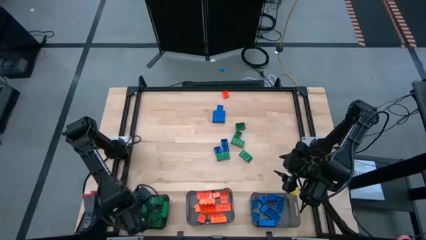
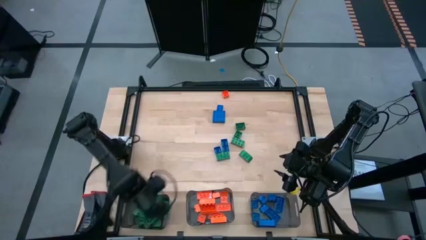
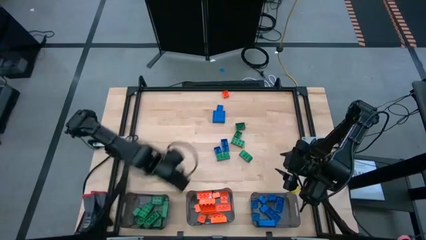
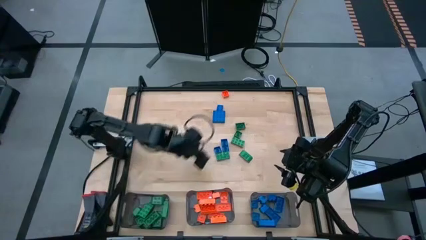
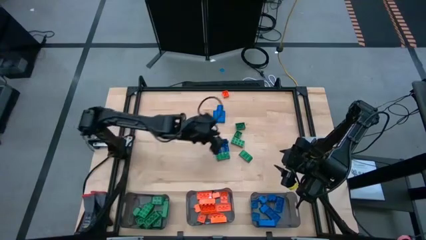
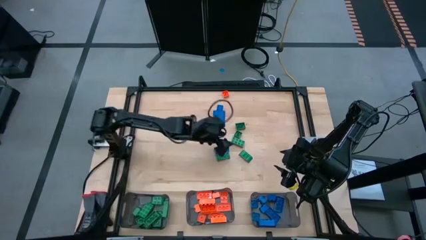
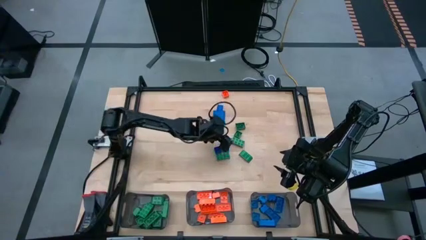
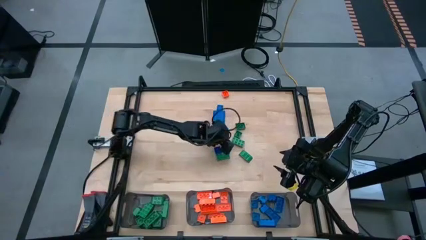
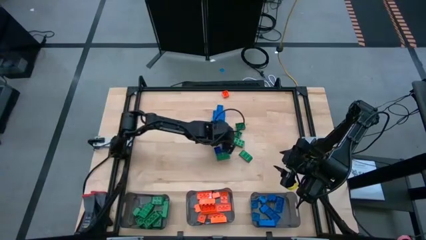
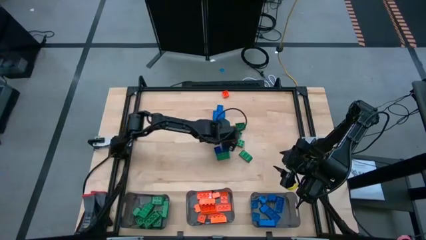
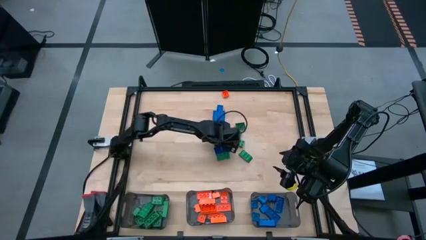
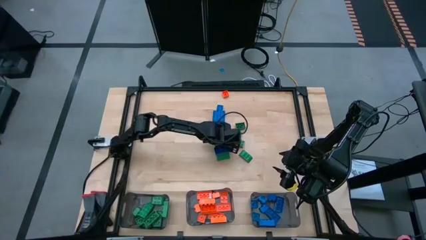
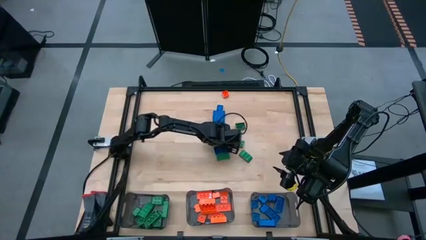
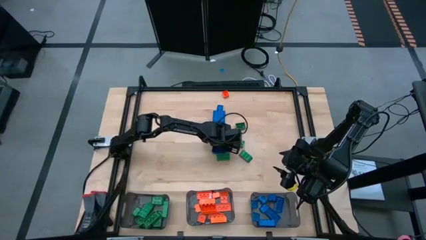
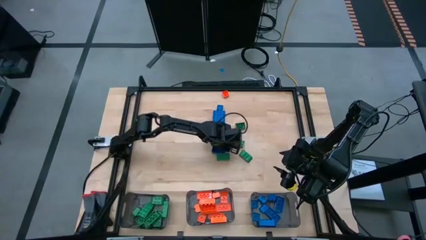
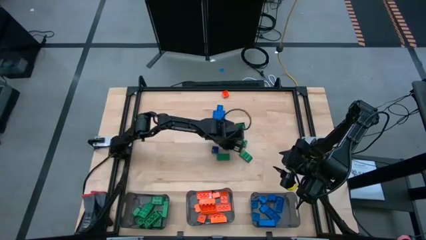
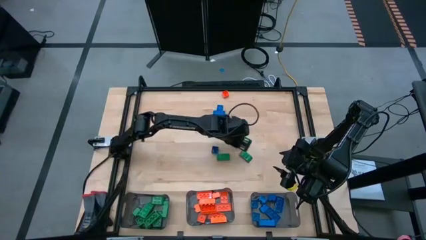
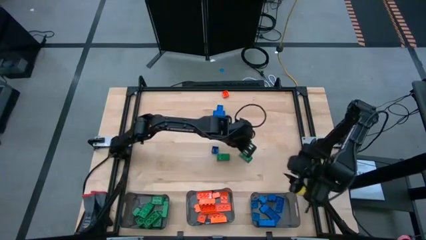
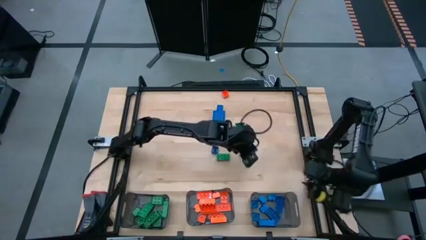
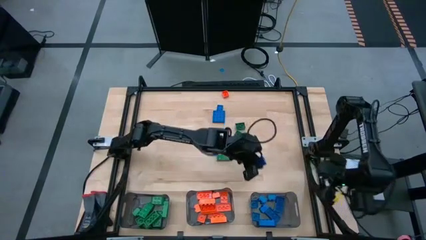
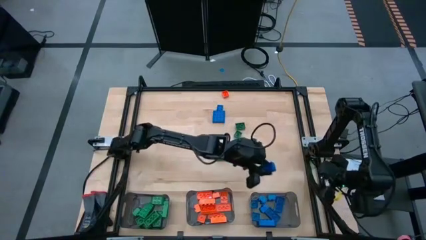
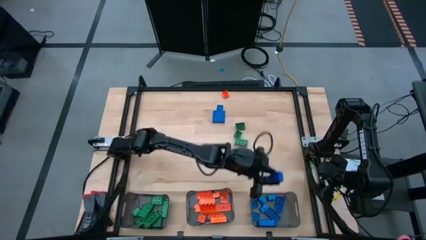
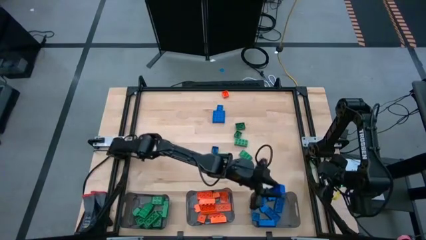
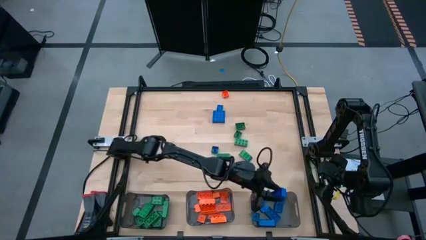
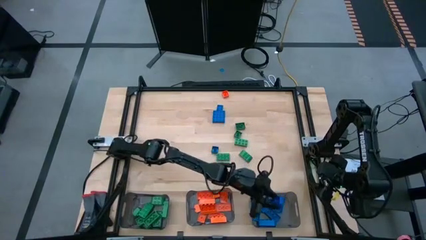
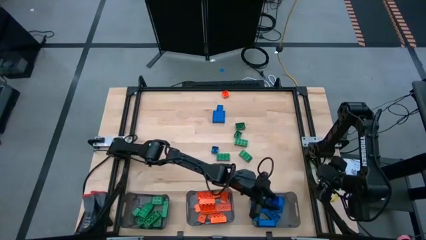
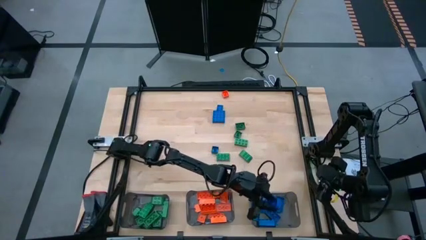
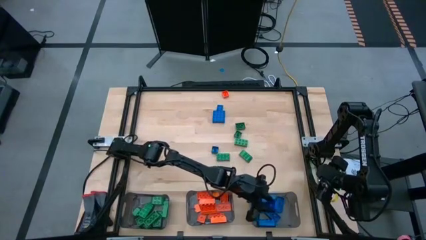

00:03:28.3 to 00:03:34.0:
Task: Sort blocks
Put the blue game piece into the right black bin

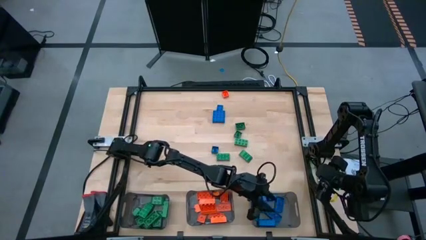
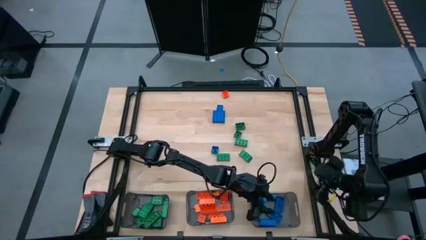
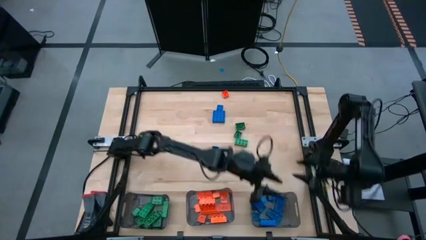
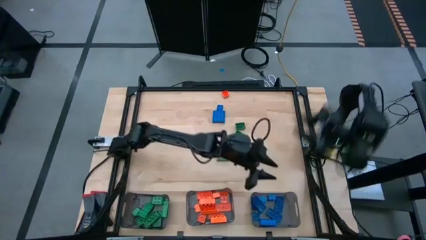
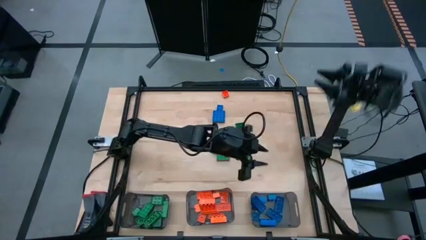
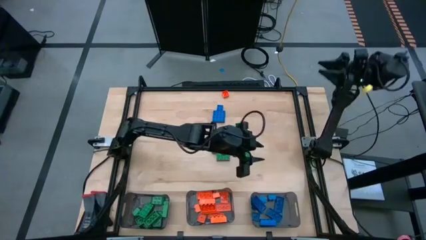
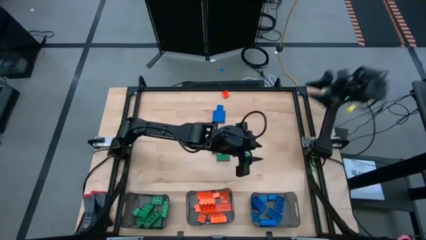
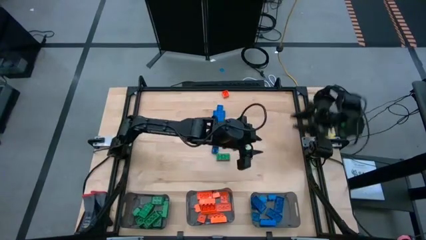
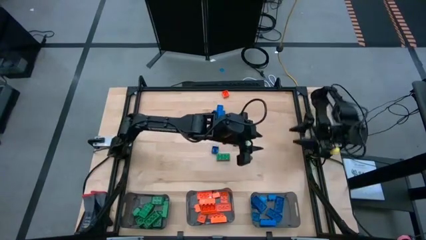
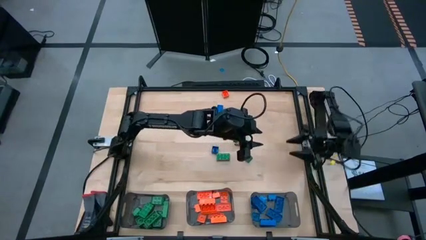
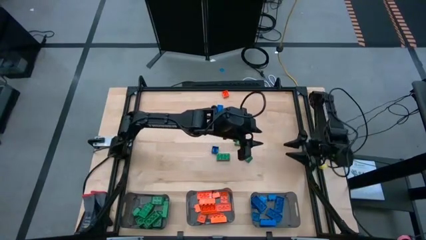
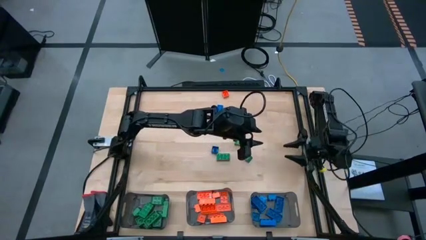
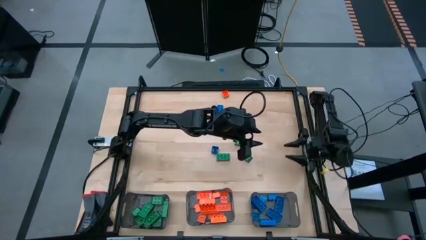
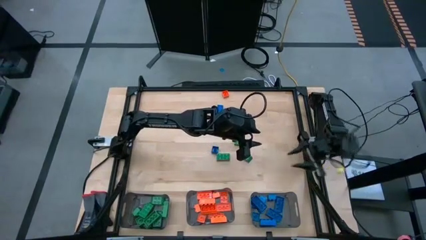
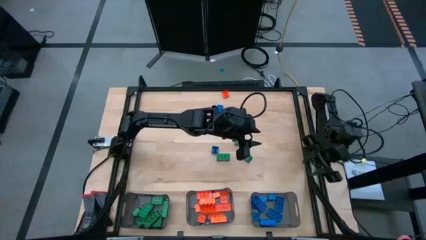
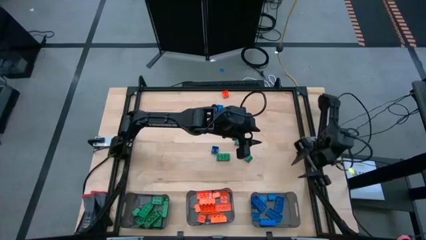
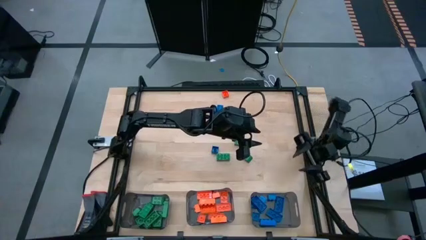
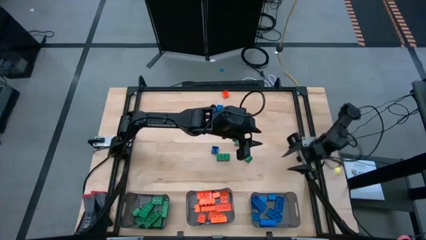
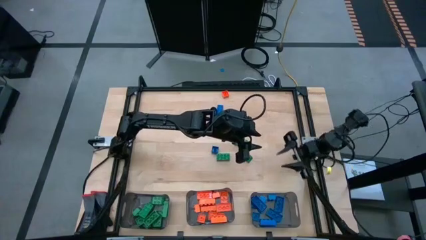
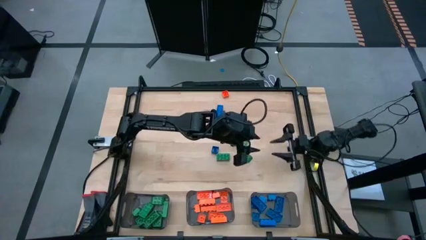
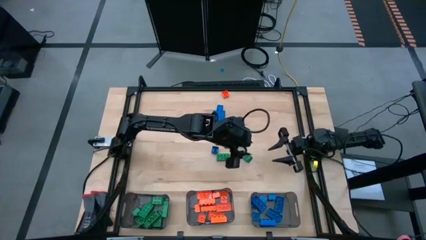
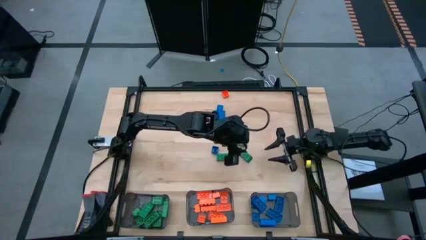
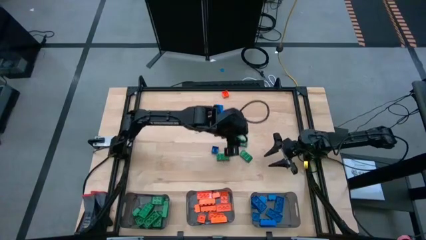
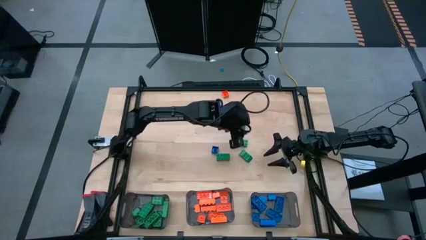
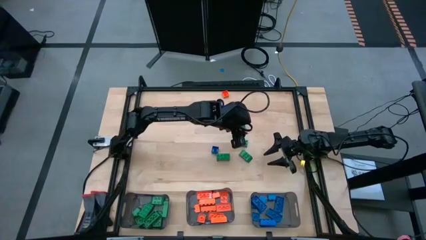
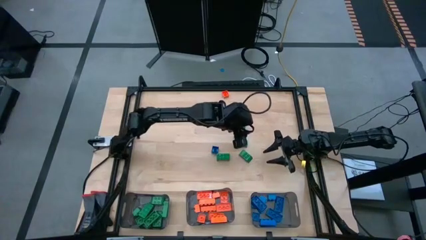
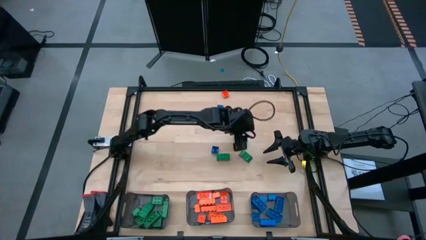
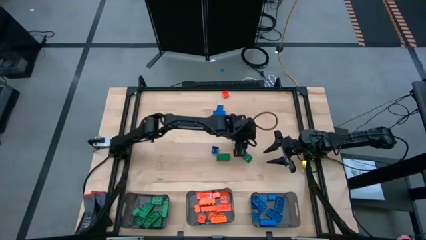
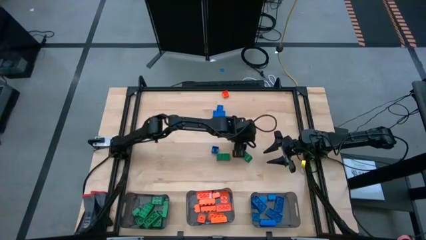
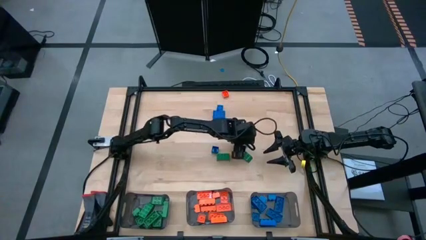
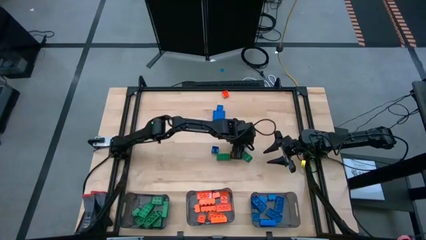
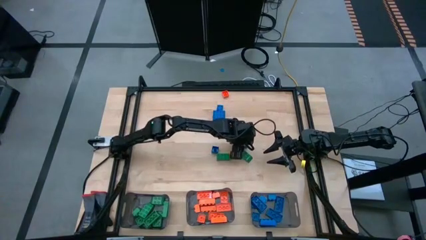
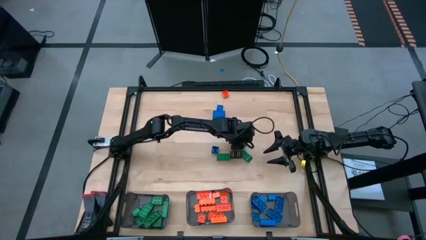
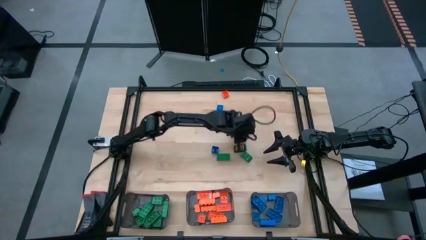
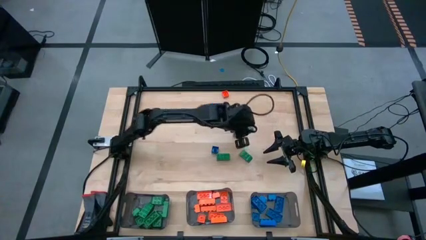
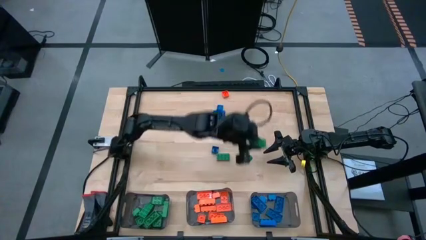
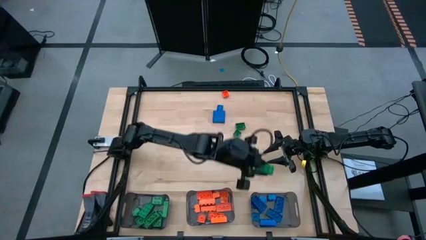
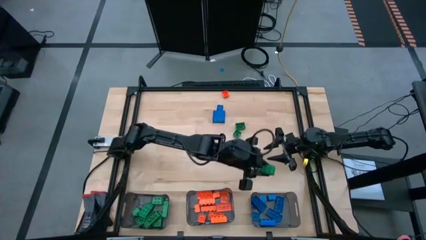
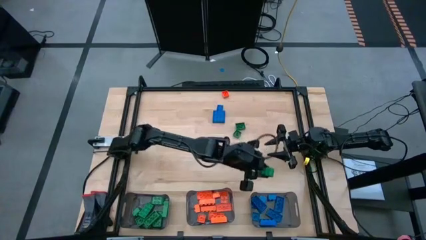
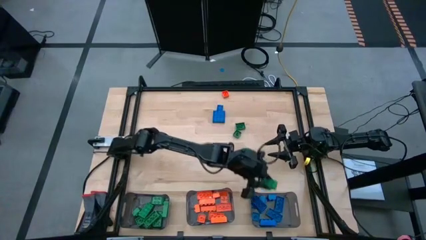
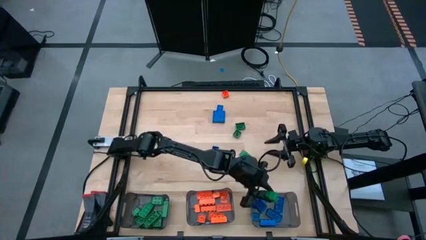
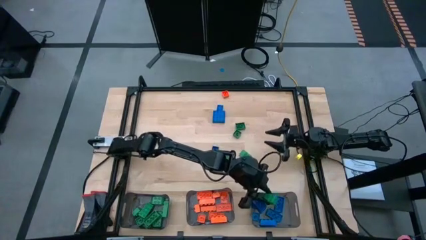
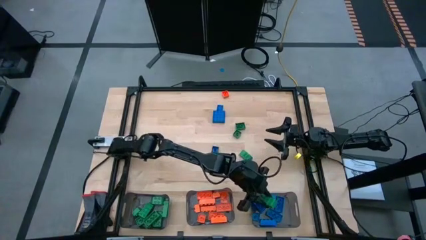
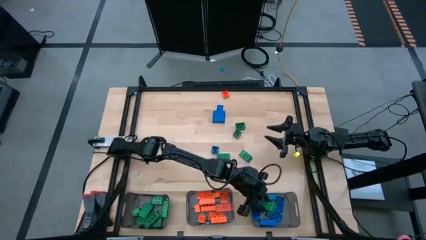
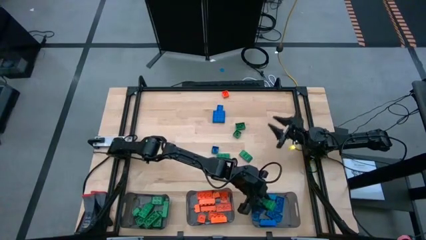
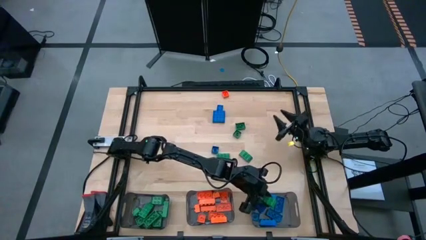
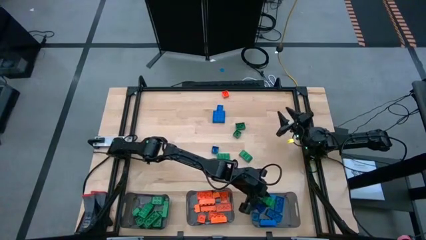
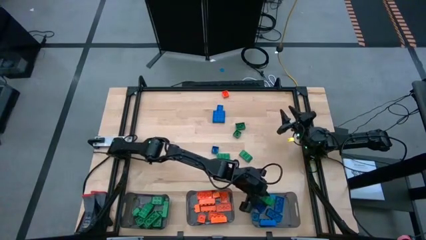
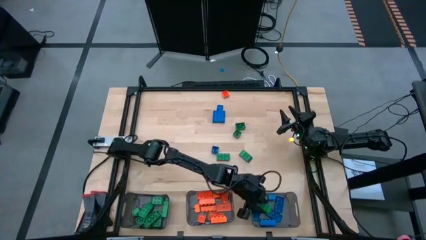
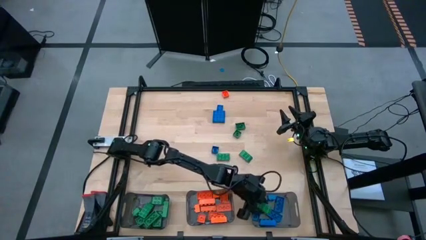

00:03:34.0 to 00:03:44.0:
Put the green game piece into the right black bin
